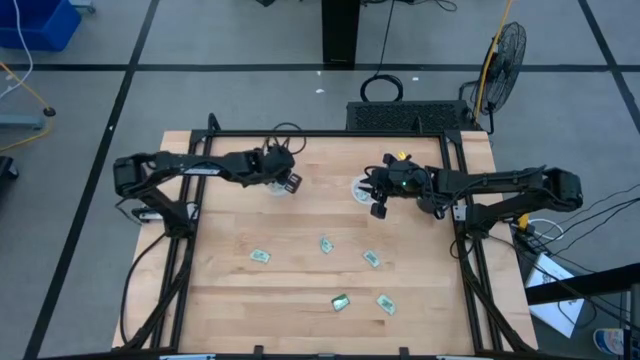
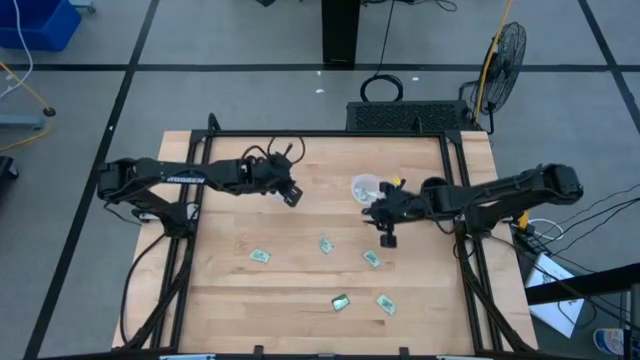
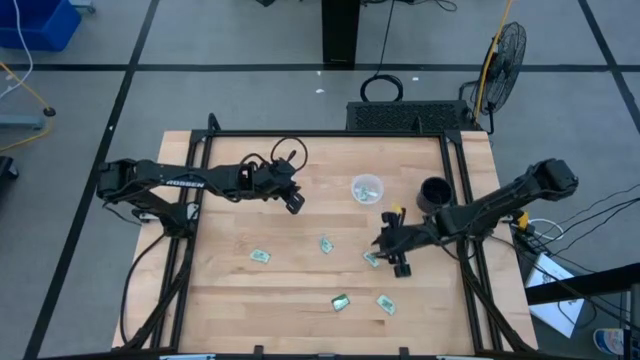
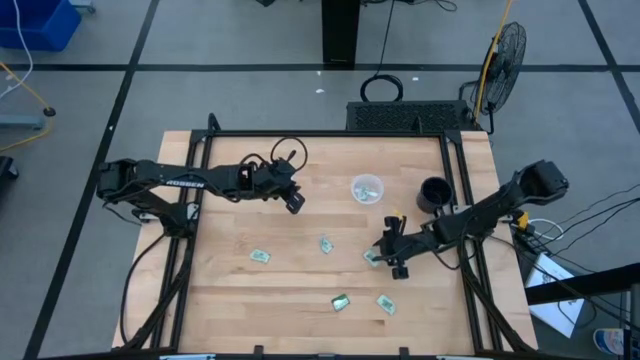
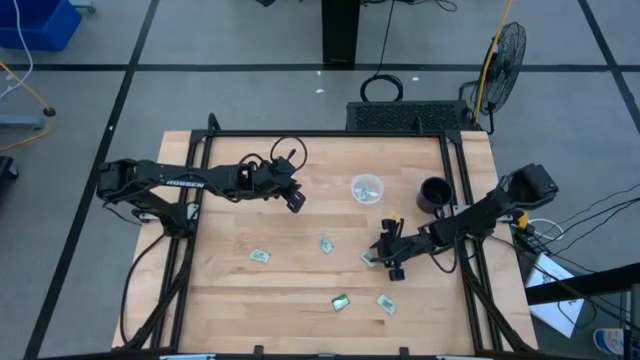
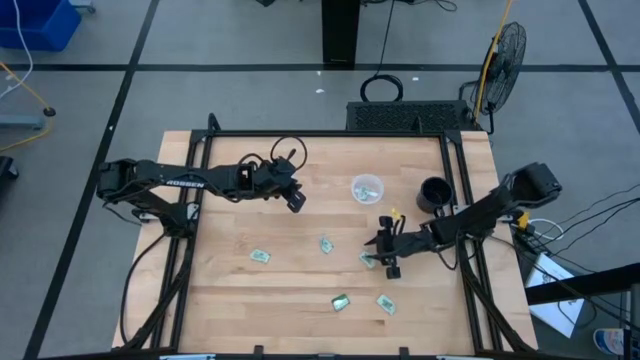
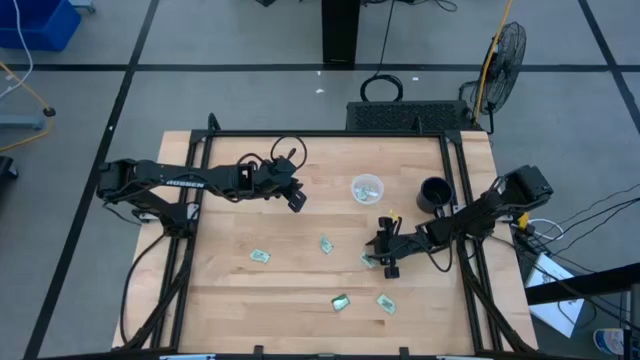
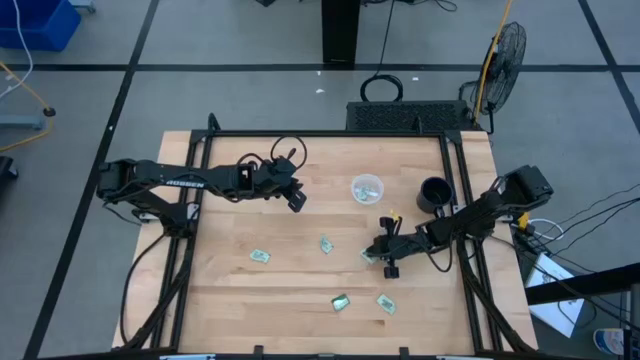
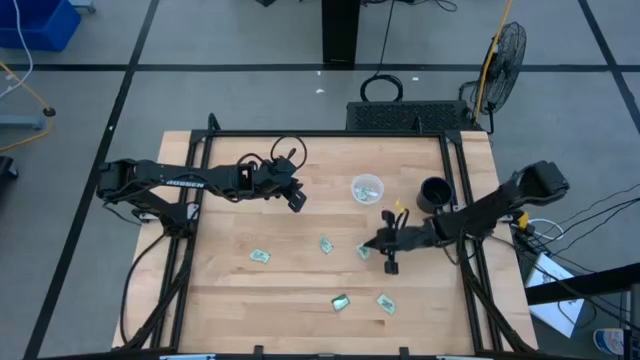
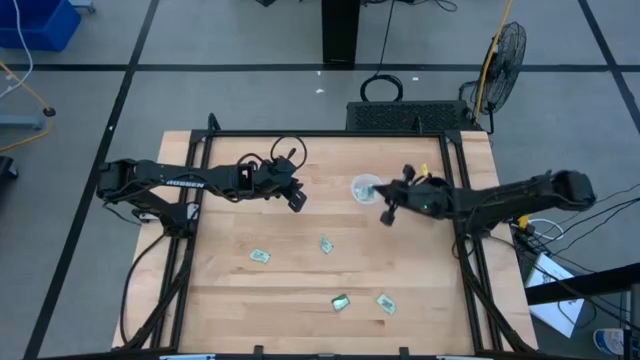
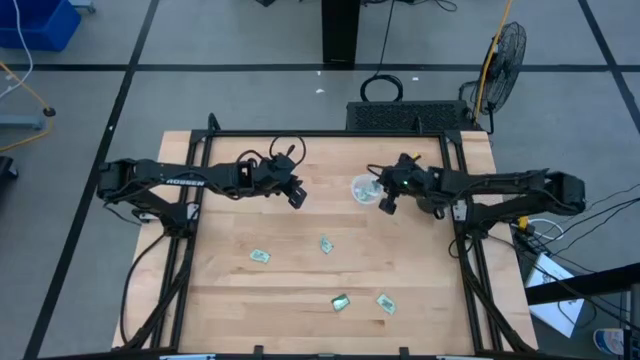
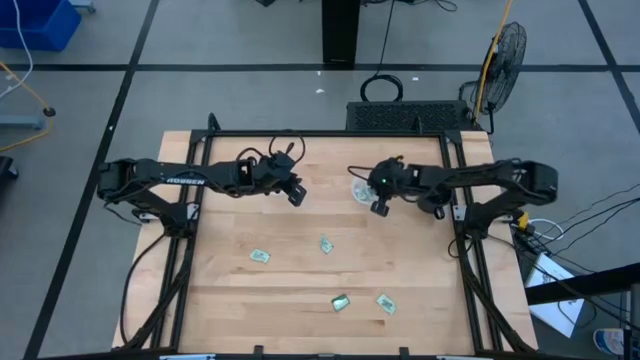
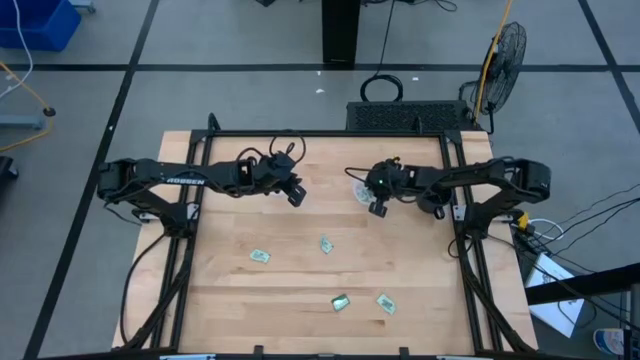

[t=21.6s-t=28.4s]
Task: Pick and place items into bin
Put the truvia packet into the right transparent bin

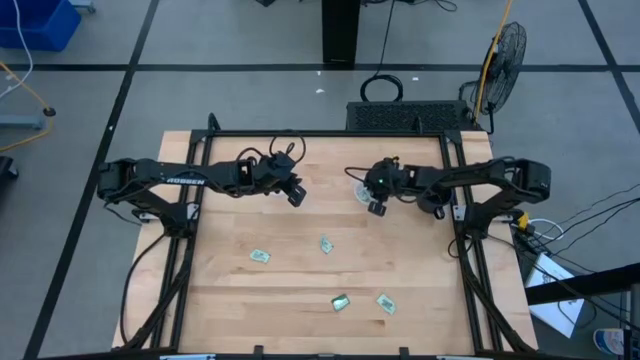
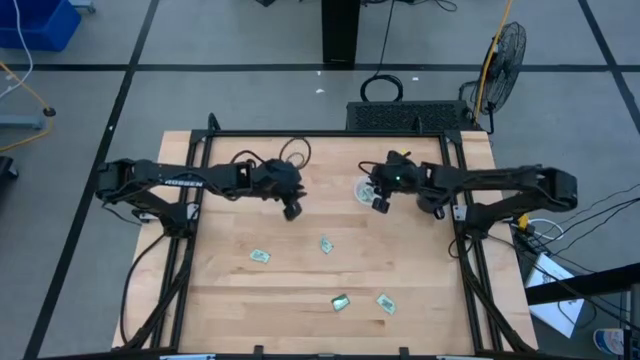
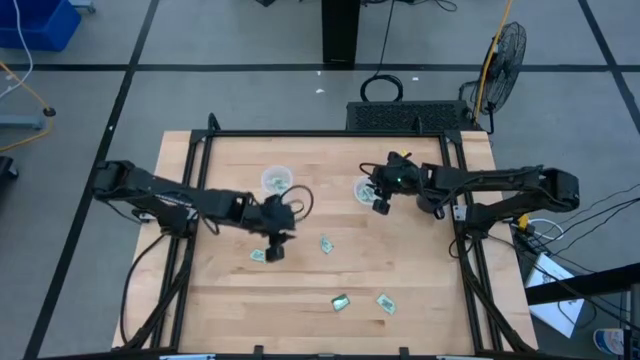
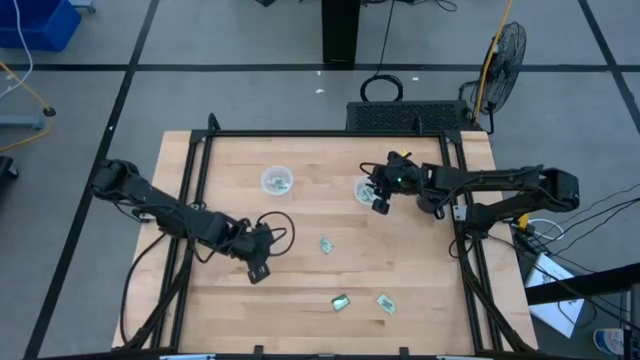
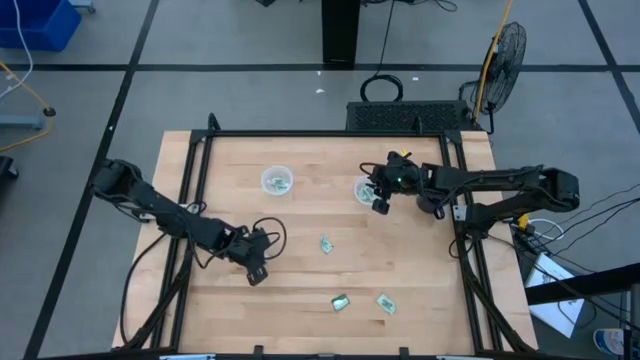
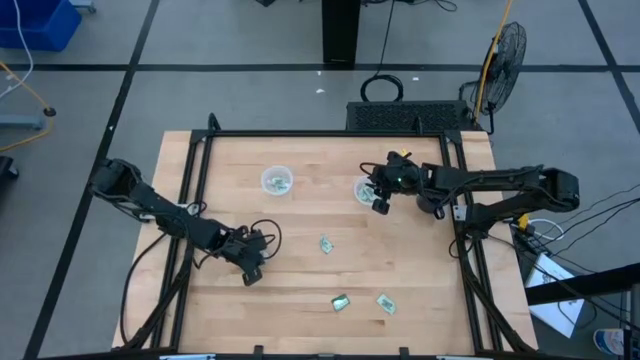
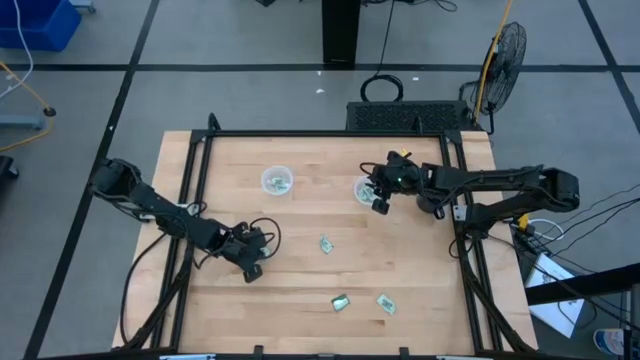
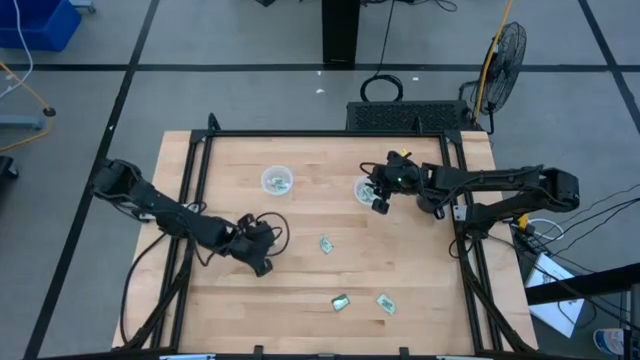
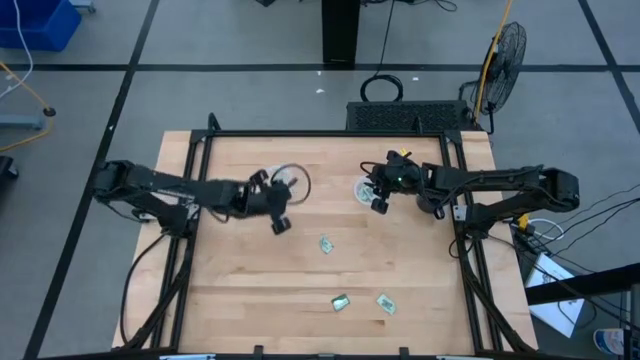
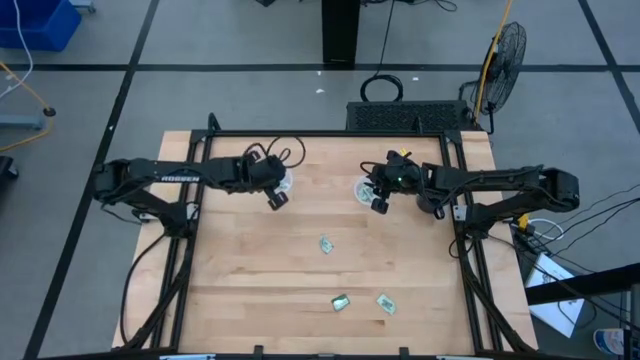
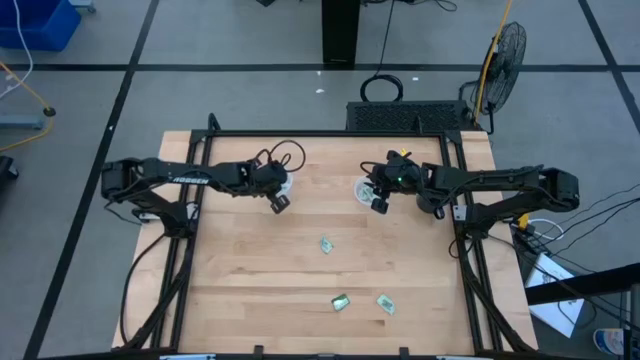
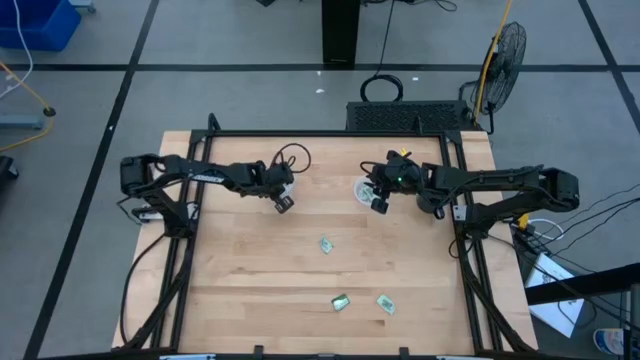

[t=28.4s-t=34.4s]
Put the stevia packet into the left transparent bin

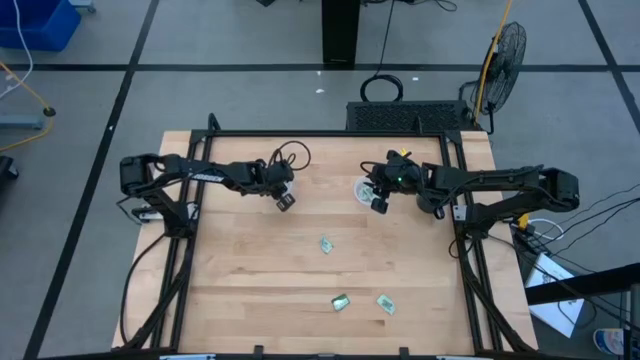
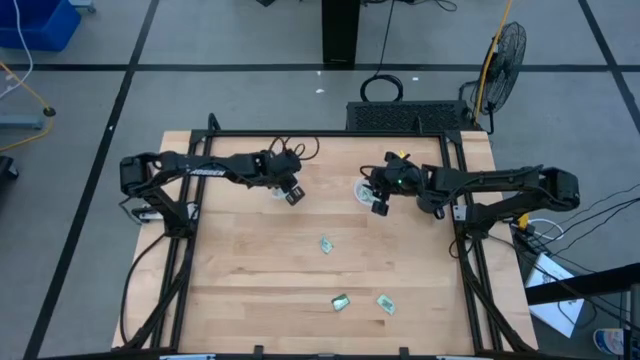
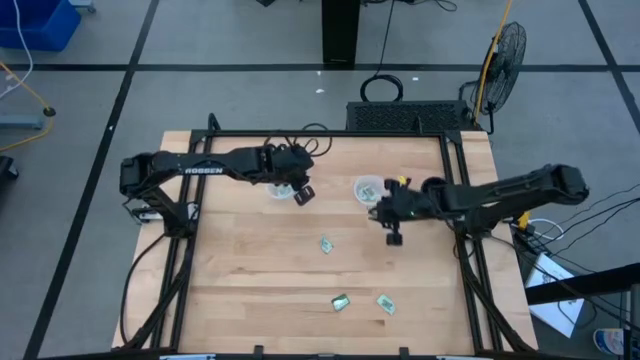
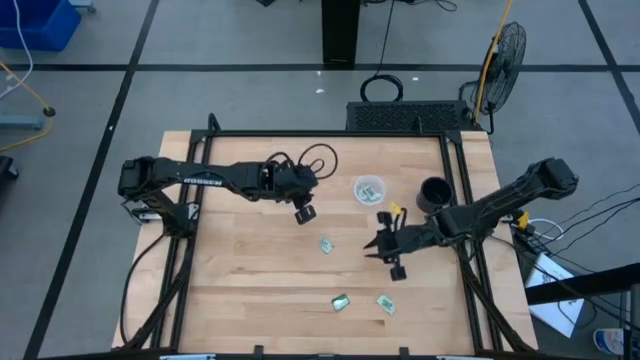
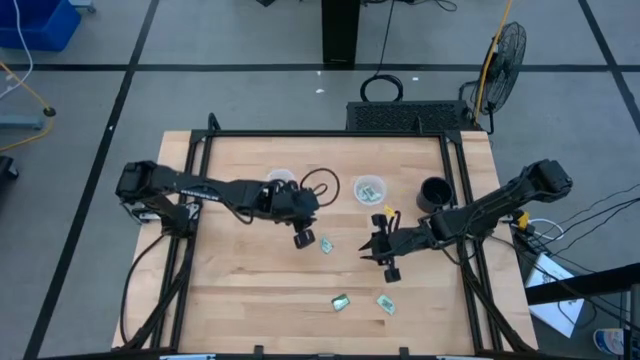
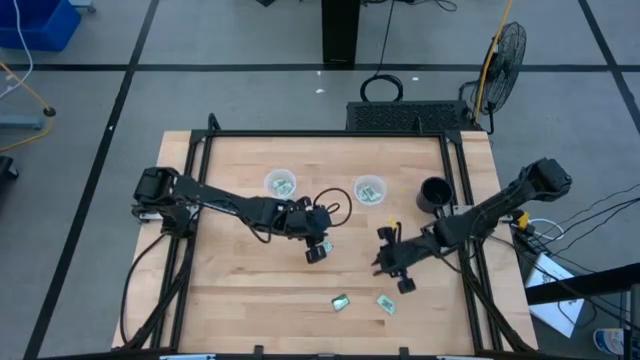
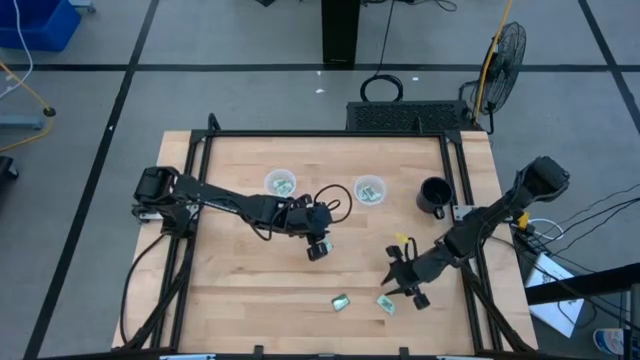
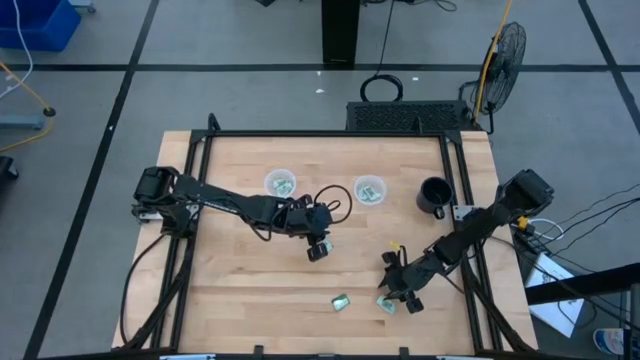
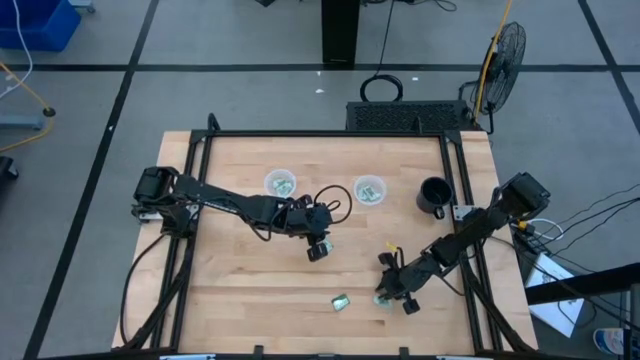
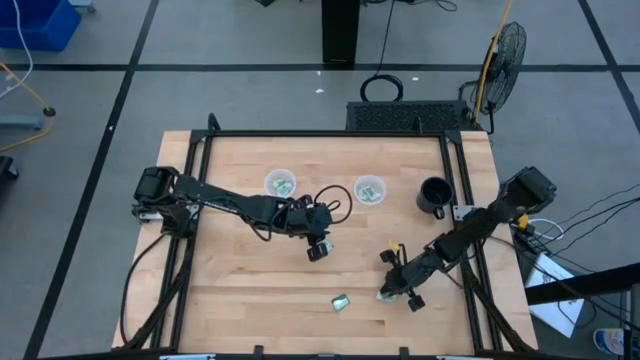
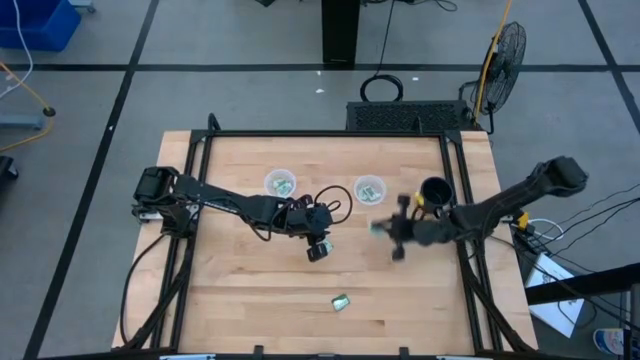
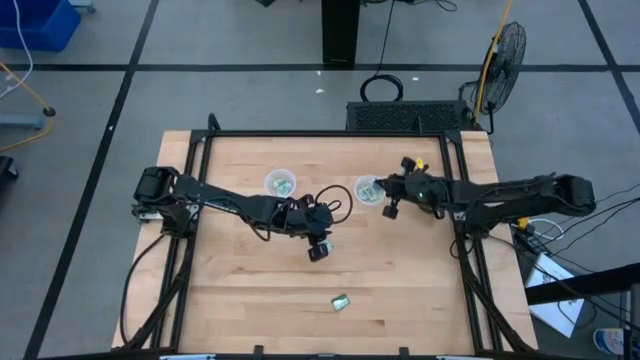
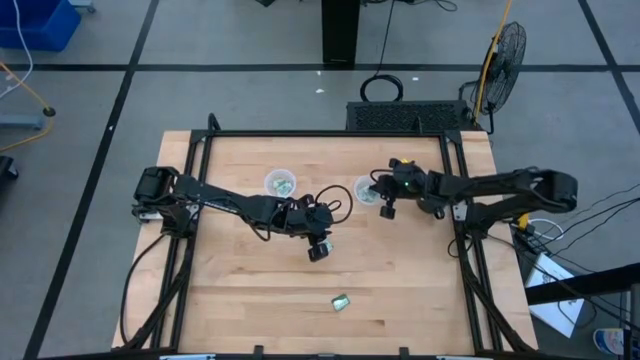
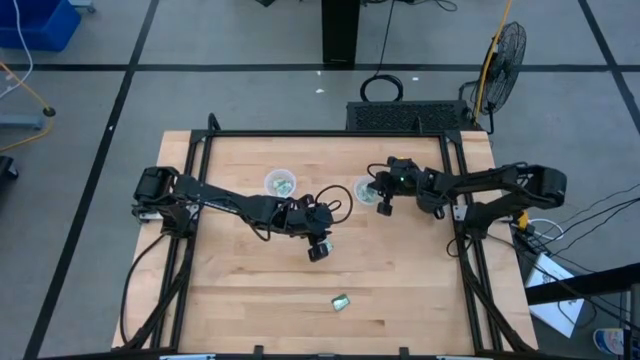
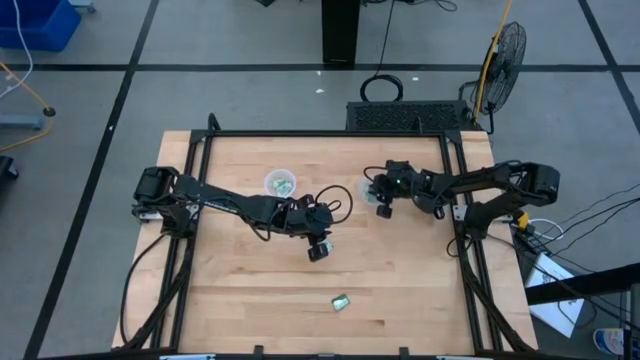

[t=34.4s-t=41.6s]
Put the truvia packet into the right transparent bin

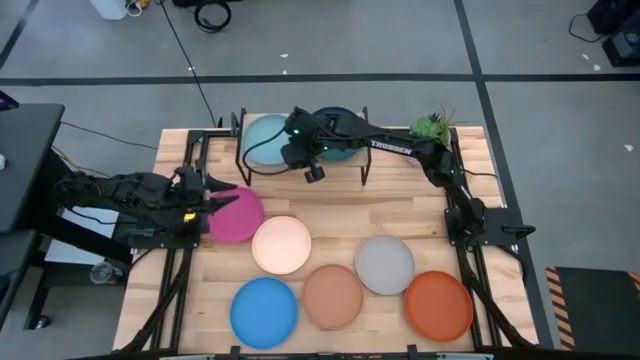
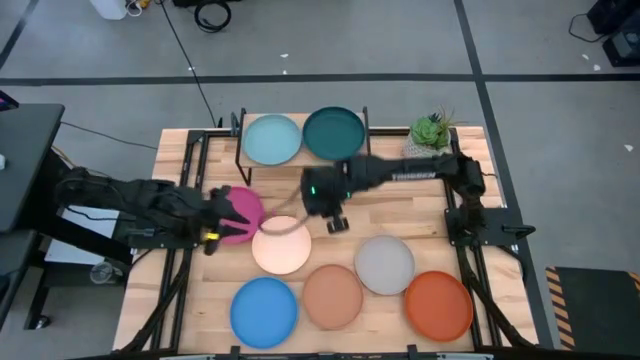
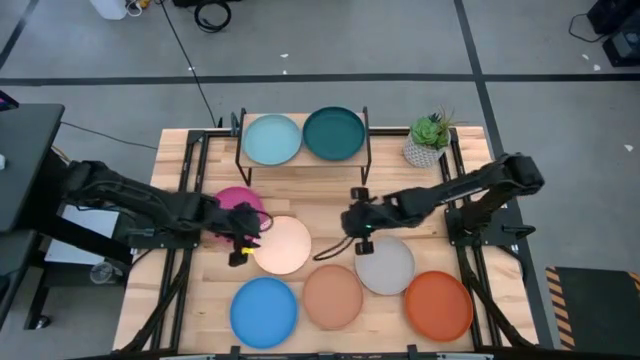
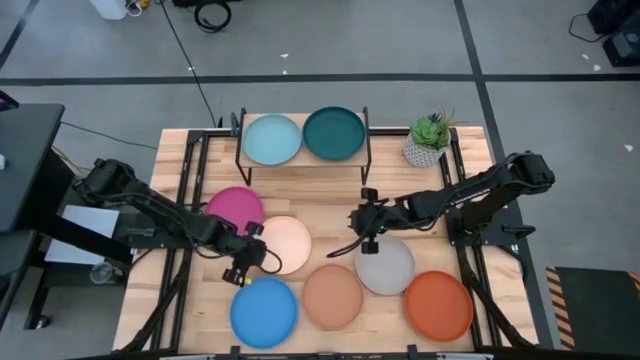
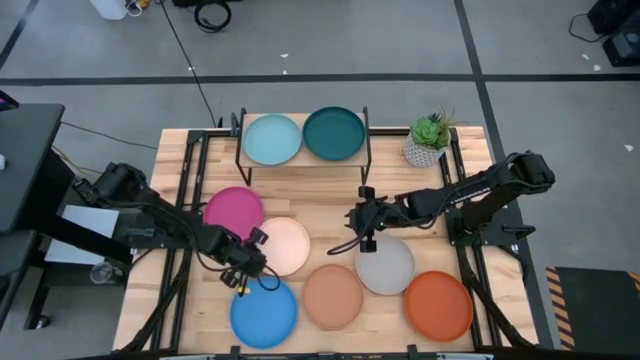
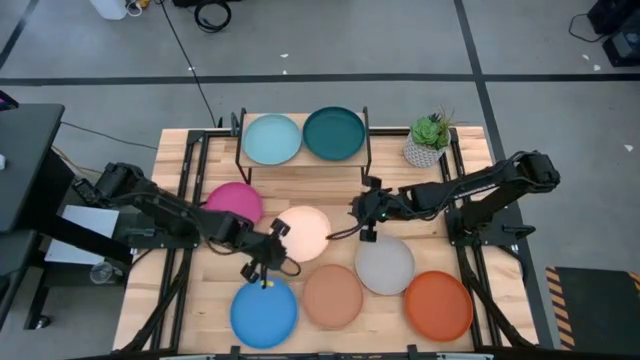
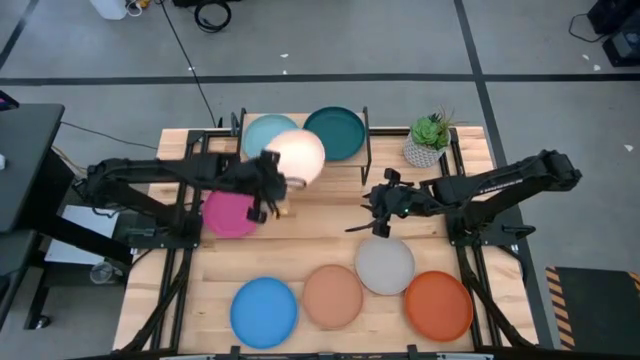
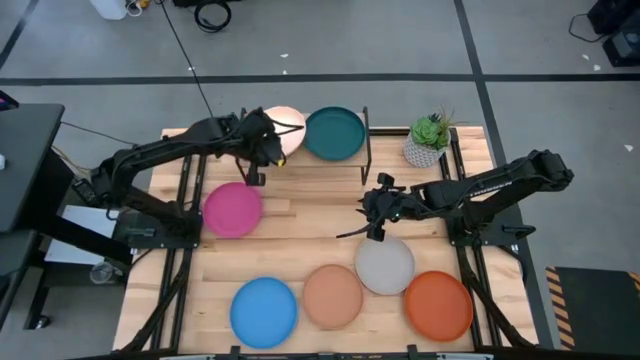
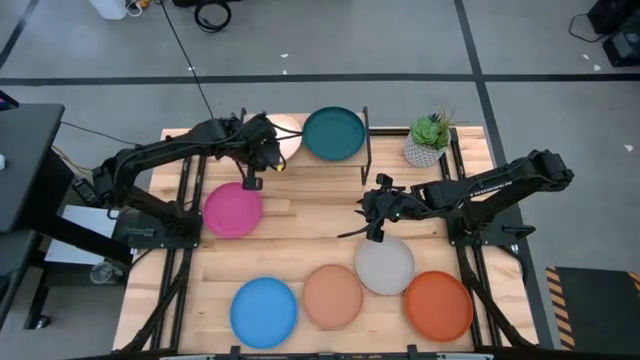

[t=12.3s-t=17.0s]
Task: Place and stack plates onto a shelf
Stack the light orange plate on top of the light blue plate on the shelf
